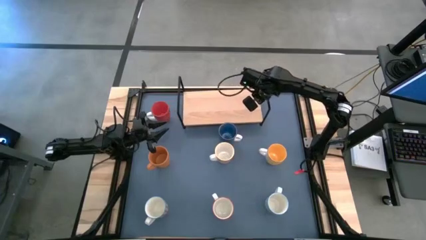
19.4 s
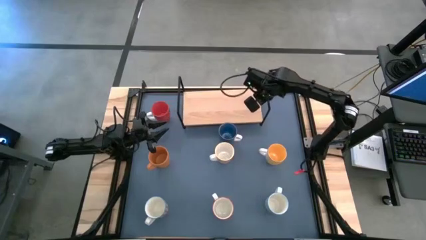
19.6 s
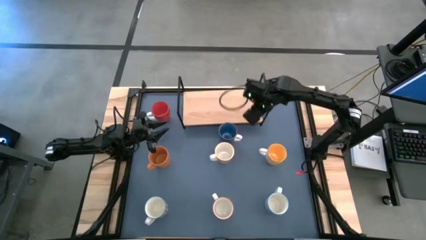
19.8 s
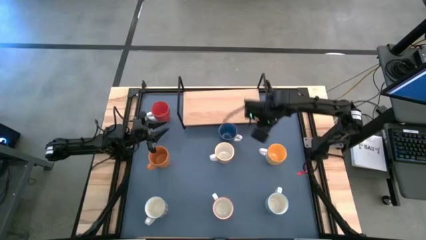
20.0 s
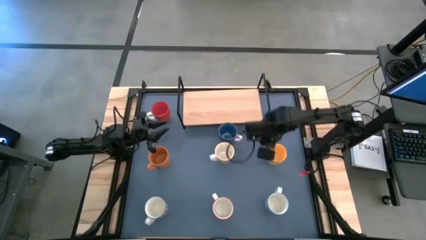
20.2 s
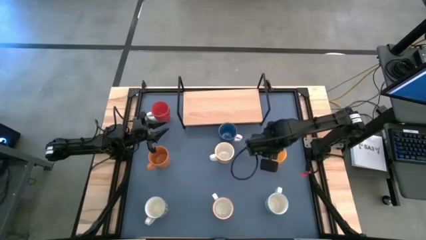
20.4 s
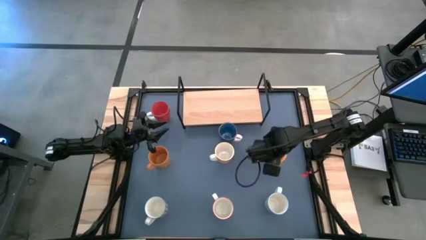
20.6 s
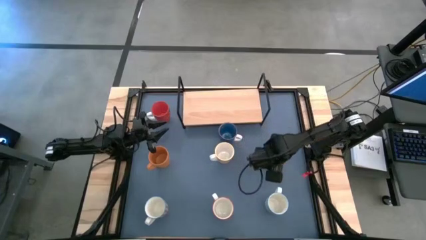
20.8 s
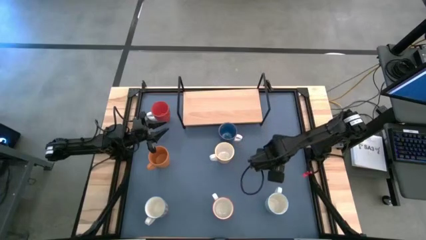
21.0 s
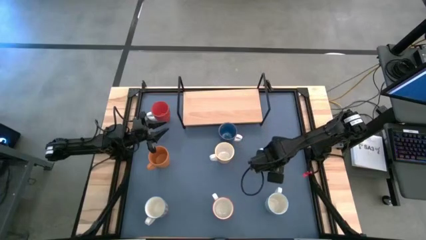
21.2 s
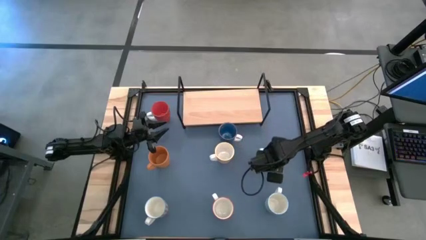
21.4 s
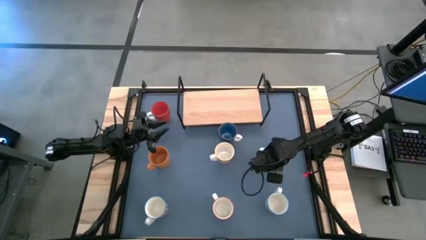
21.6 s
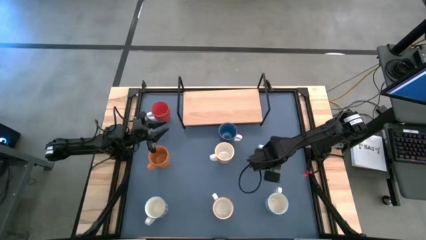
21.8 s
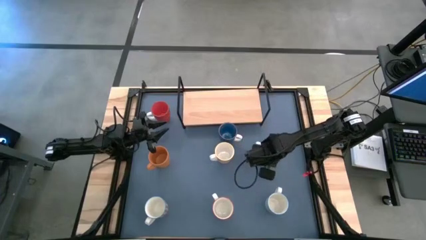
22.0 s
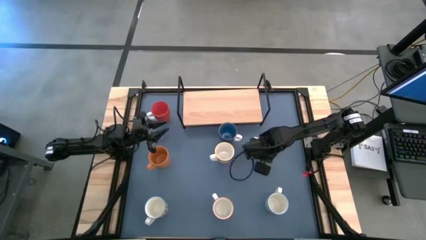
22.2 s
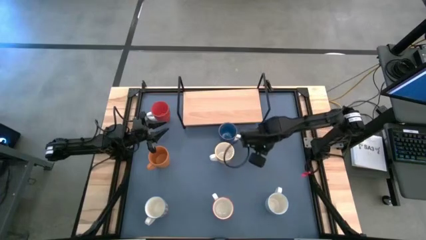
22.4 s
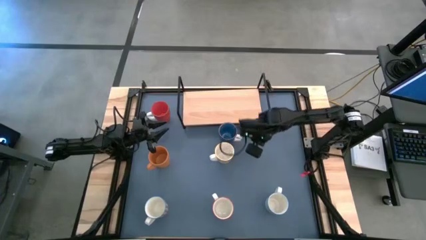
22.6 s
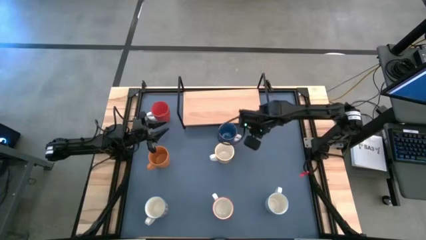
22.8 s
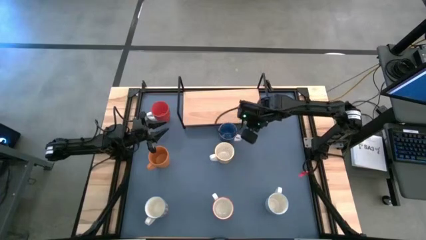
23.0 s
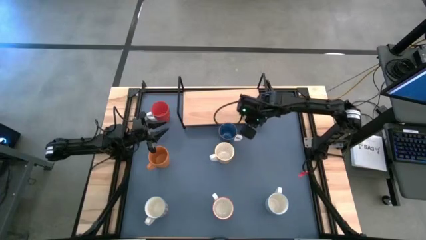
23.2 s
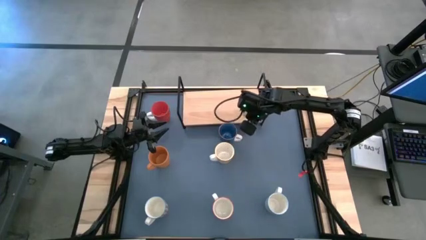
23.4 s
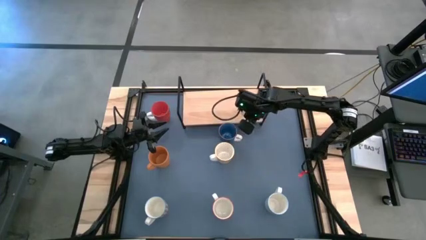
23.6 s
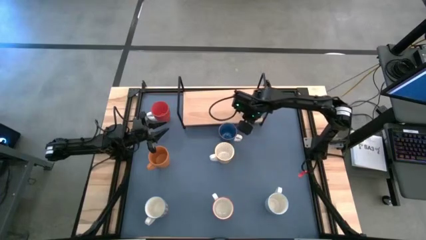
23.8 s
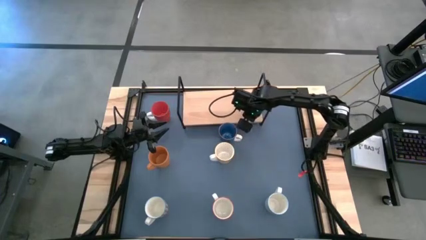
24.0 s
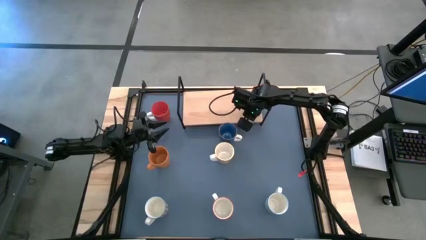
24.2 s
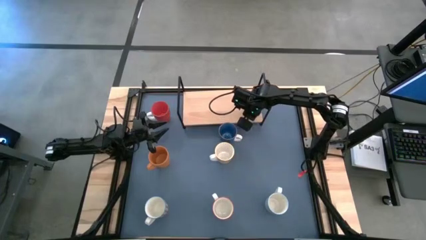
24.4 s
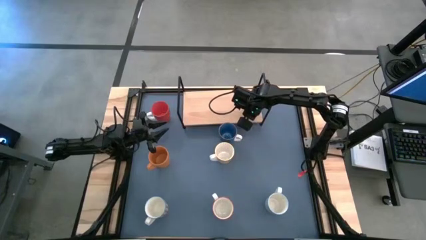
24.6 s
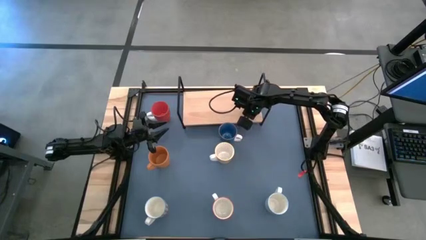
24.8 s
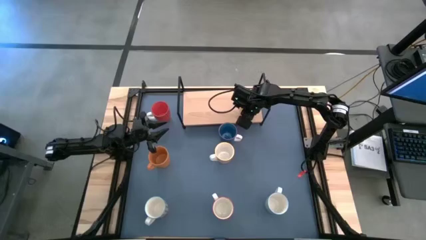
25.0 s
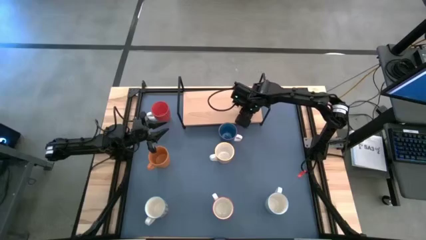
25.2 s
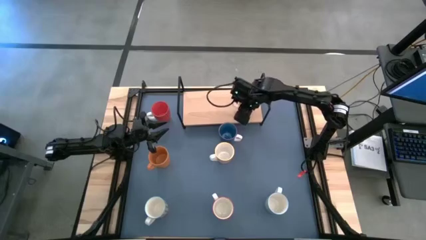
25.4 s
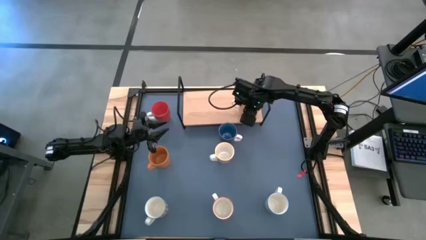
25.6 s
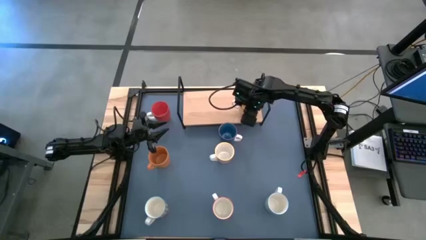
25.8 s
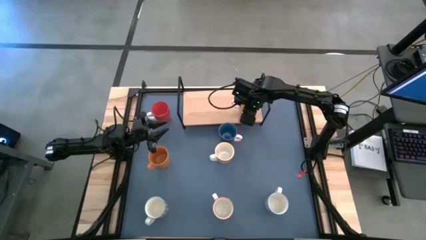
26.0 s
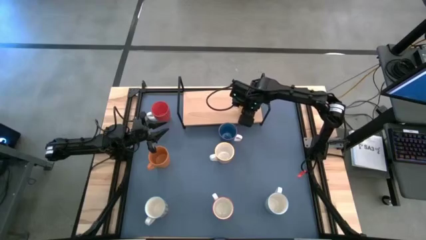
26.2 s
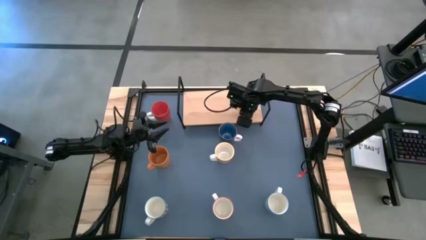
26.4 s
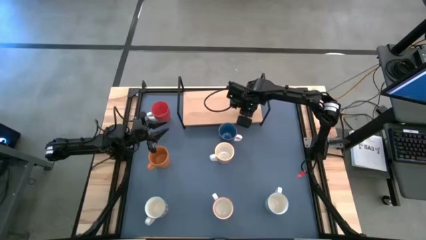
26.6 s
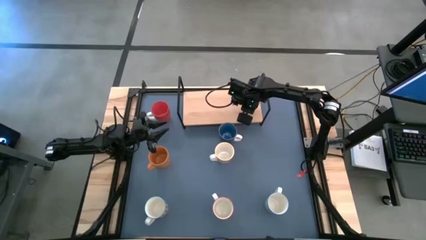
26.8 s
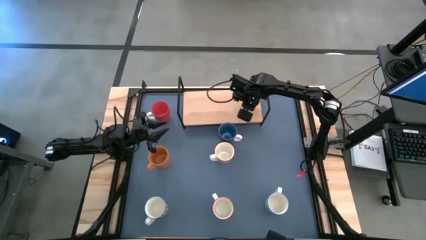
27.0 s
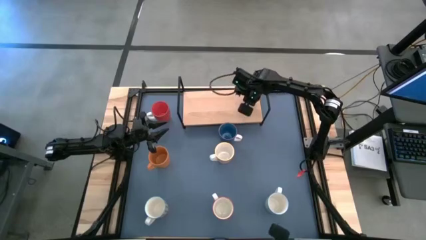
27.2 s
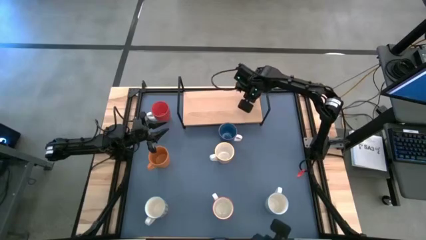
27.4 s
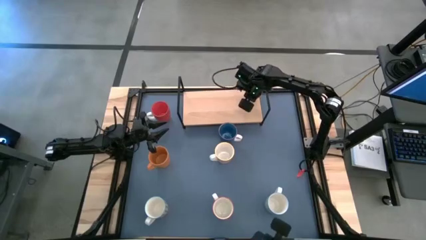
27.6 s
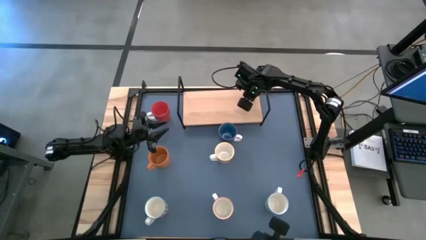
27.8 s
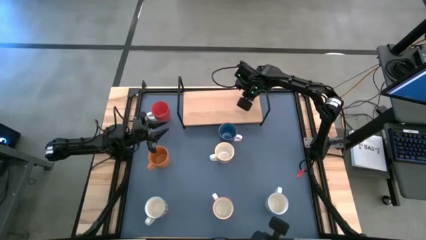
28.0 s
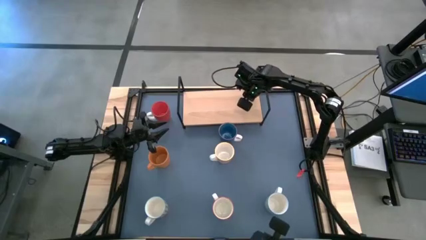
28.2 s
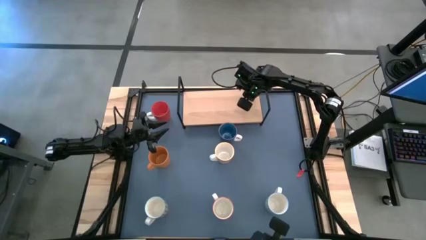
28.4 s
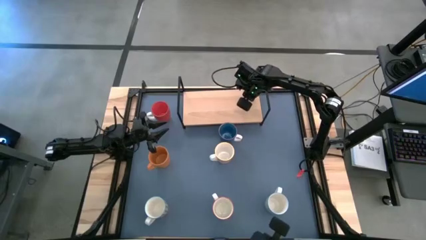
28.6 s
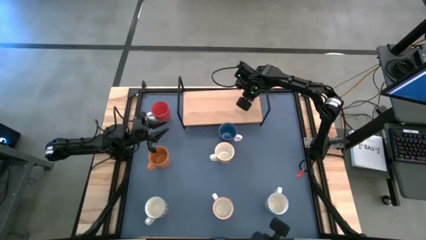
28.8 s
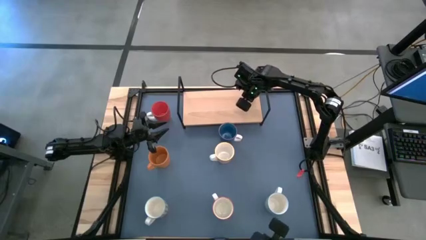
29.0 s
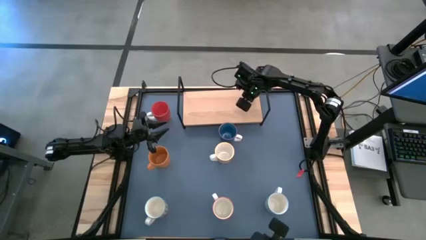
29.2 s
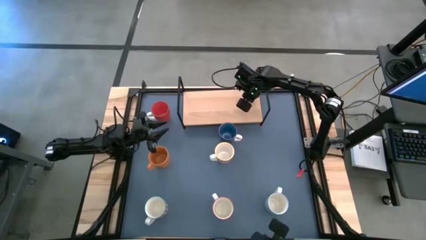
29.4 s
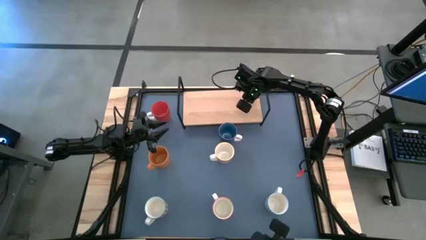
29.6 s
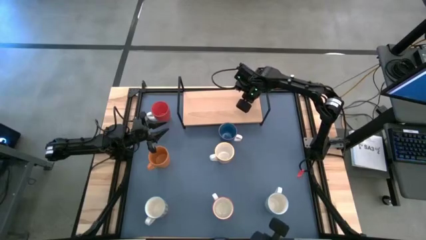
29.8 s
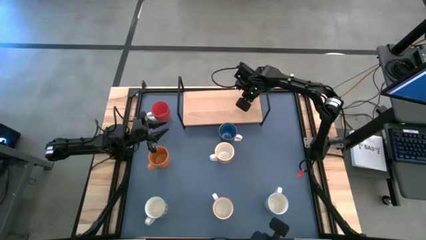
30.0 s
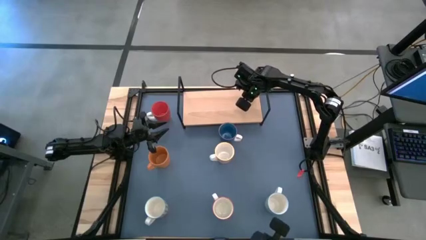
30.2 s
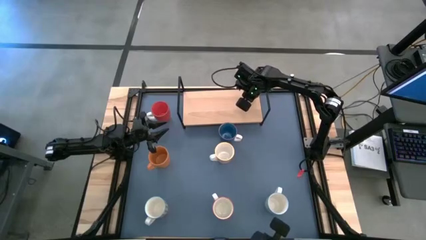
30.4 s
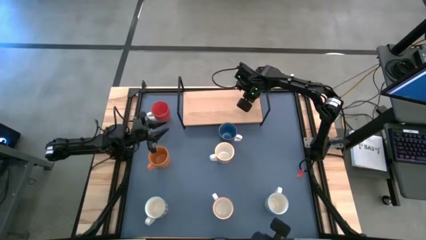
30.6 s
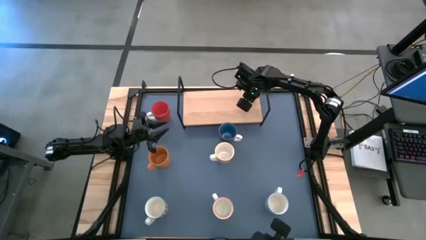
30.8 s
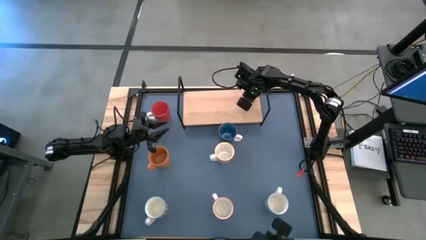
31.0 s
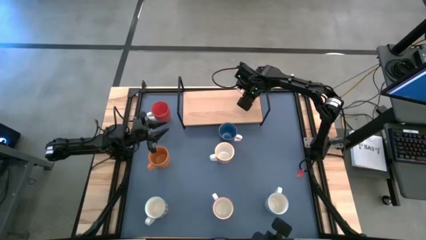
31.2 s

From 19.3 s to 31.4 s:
Task: Place coffee mugs
Put the yellow cup on the shelf

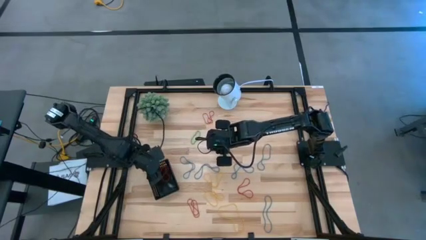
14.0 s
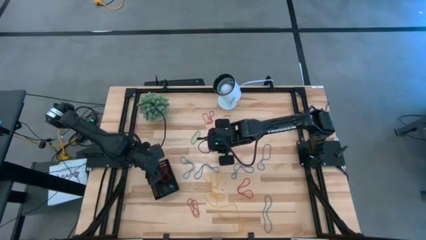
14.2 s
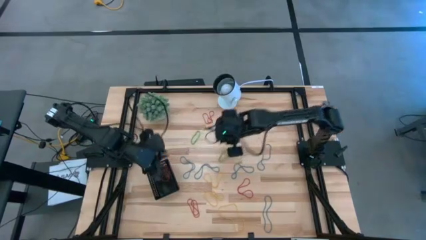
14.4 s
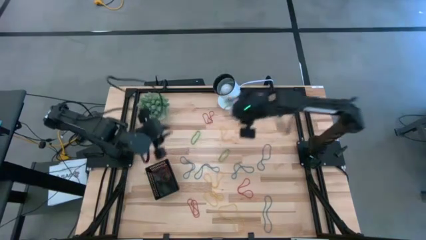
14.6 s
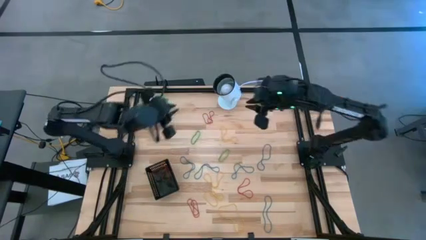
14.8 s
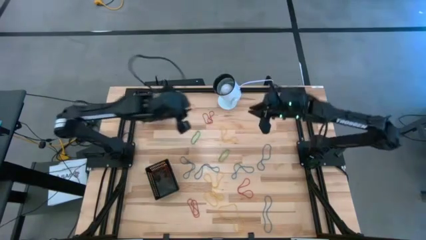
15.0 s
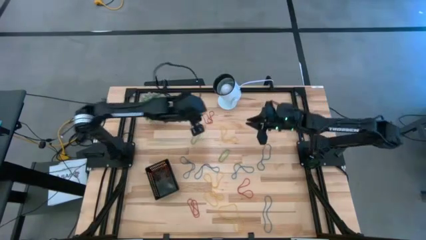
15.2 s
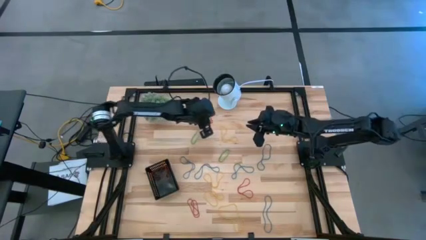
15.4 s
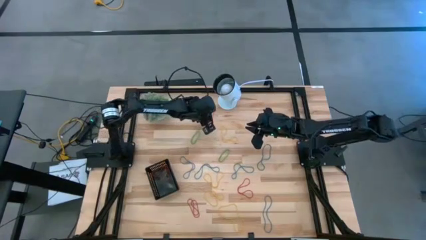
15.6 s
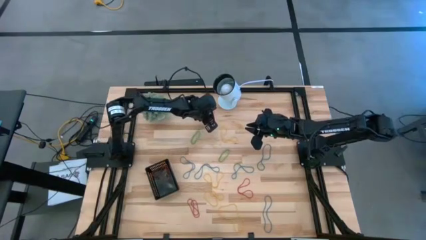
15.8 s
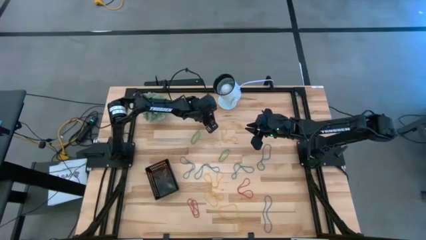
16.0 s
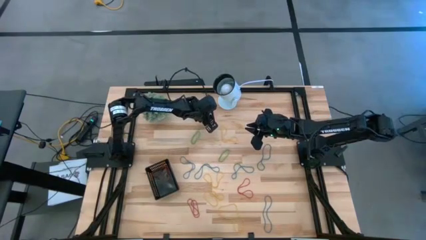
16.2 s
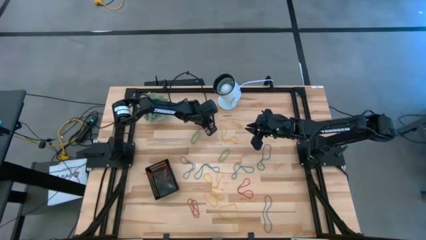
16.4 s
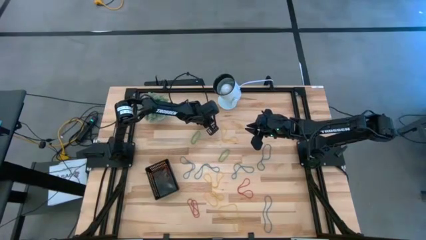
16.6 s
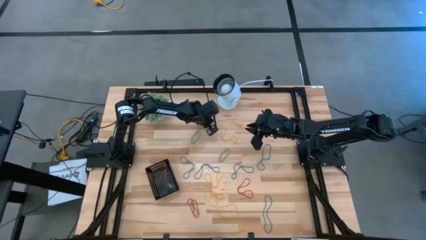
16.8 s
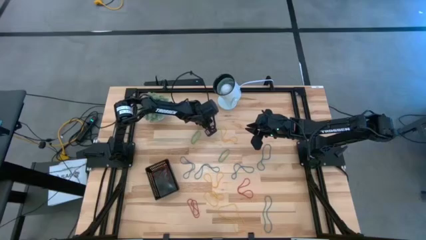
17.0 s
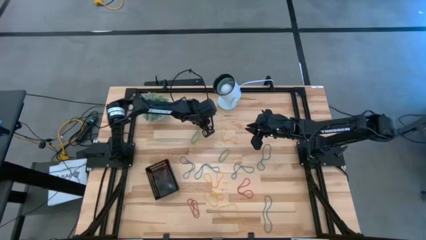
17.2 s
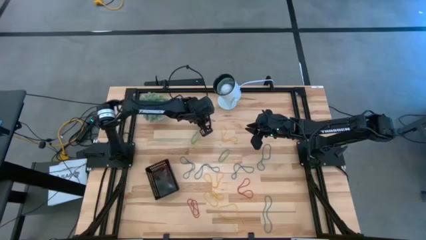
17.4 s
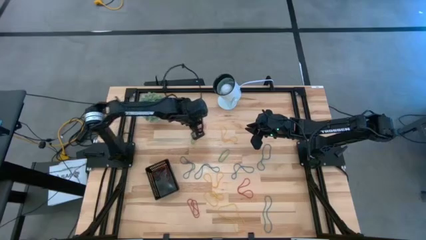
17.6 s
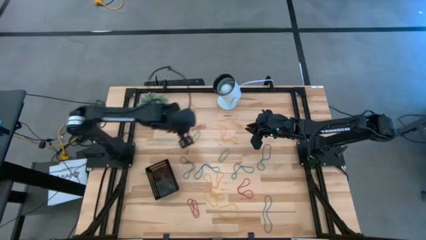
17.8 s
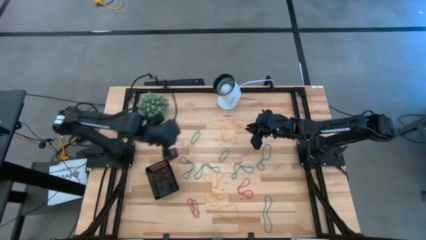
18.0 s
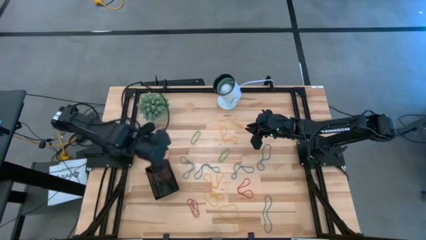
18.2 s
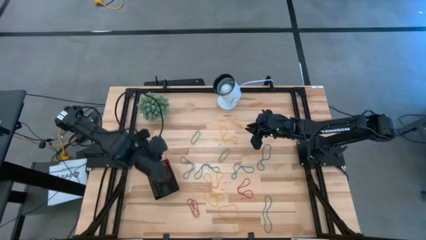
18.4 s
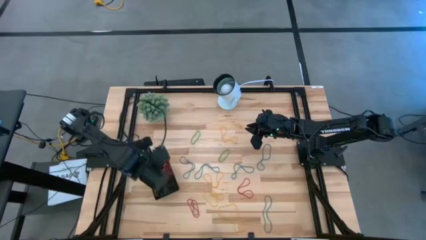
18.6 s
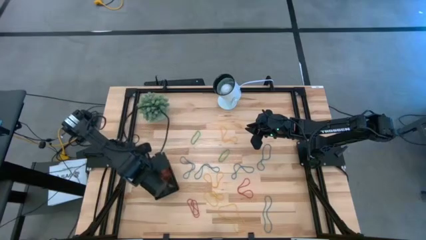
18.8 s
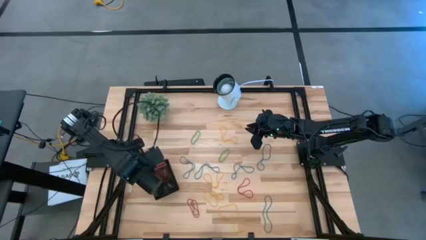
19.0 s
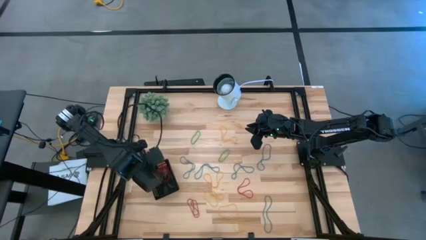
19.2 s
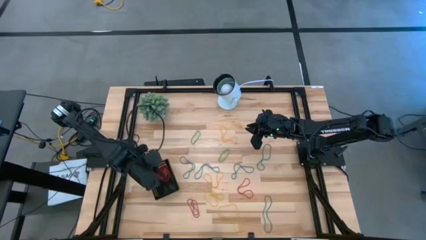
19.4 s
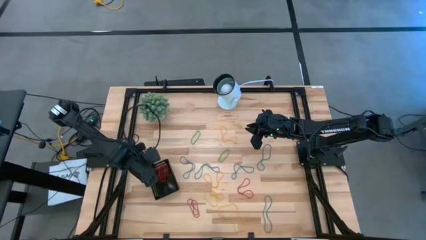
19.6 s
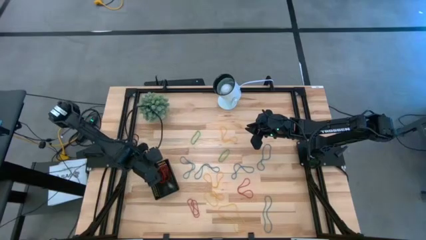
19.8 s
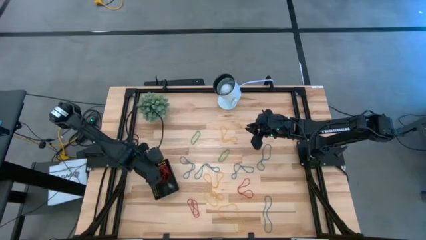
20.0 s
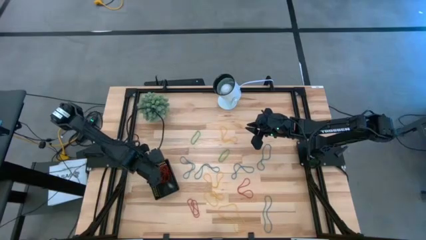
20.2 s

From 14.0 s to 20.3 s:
Task: Pick and place items into bin
Put the red rubber band into the black bin
